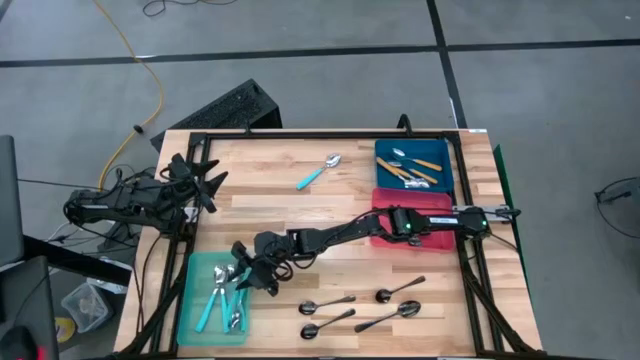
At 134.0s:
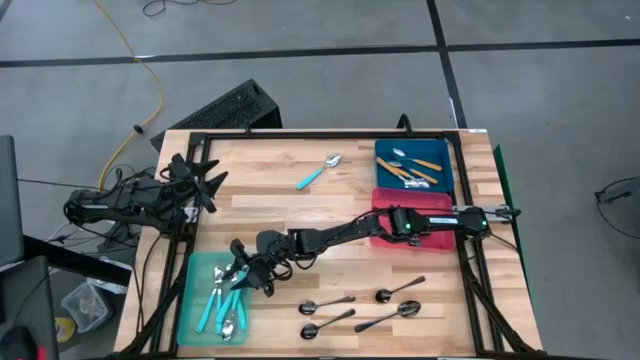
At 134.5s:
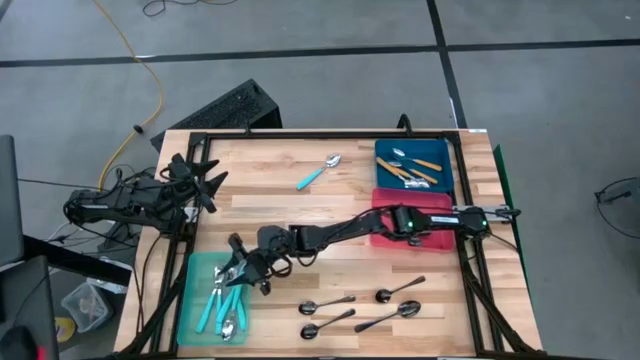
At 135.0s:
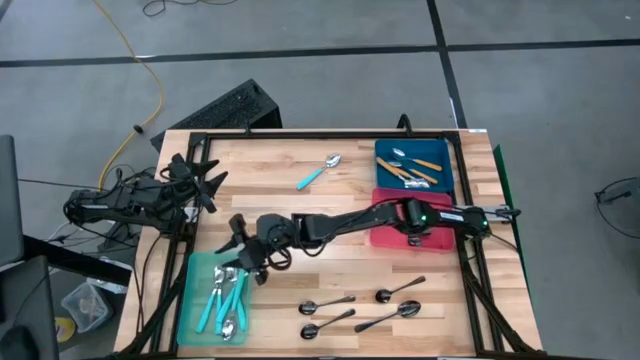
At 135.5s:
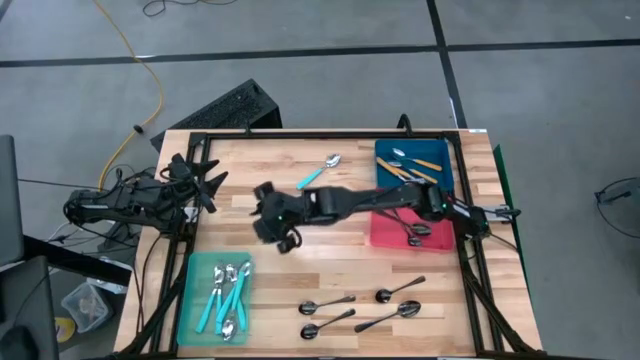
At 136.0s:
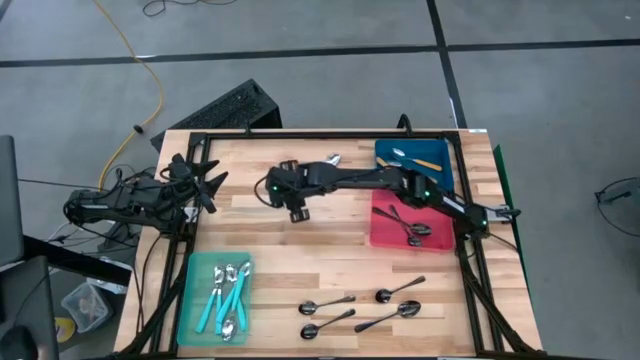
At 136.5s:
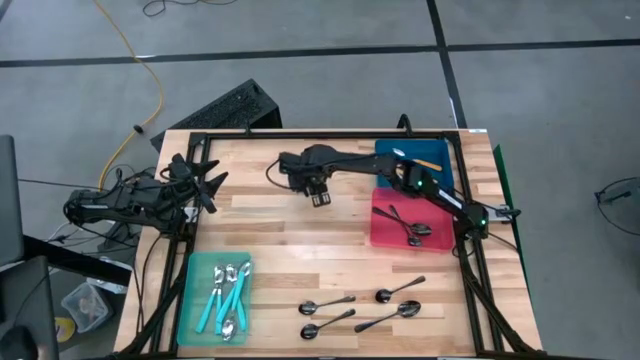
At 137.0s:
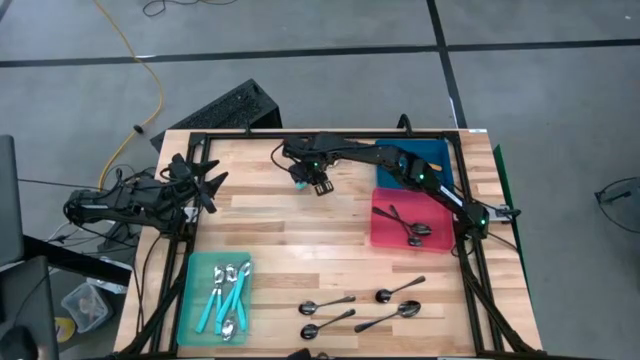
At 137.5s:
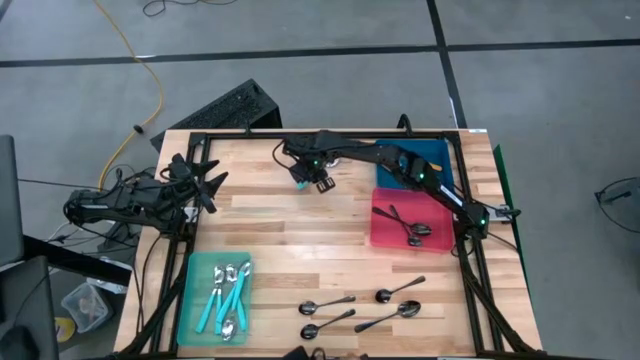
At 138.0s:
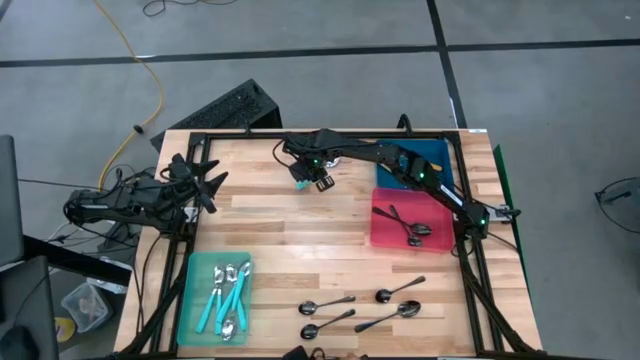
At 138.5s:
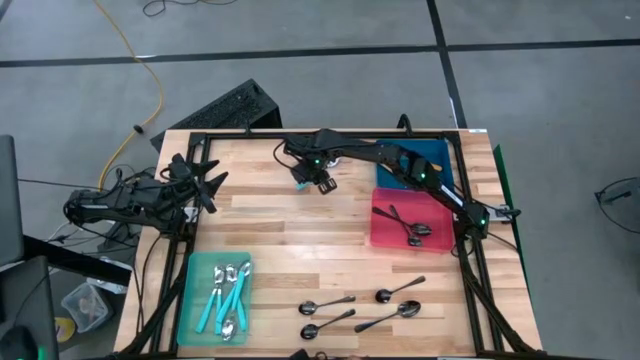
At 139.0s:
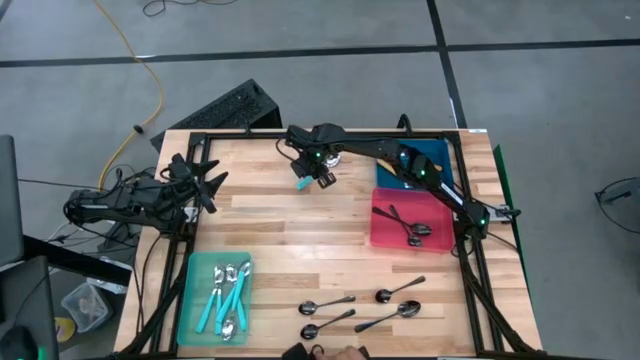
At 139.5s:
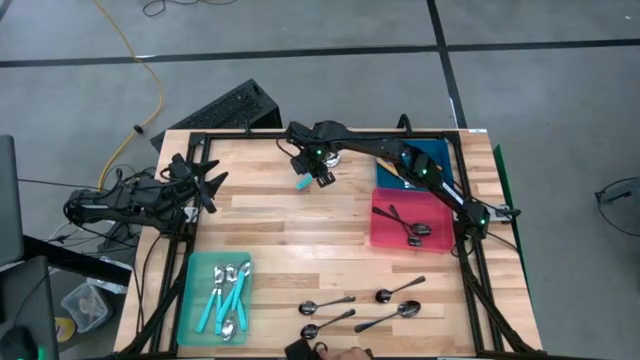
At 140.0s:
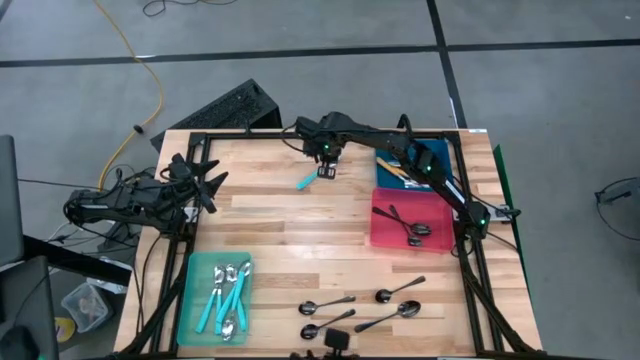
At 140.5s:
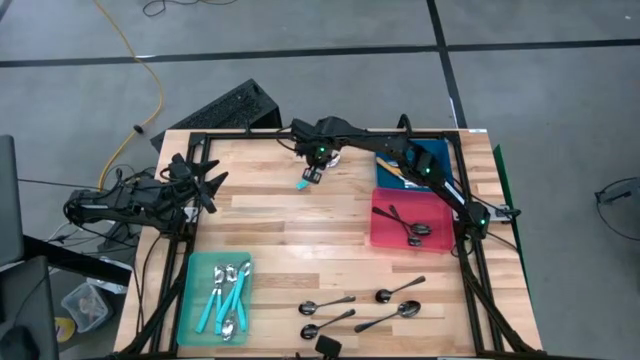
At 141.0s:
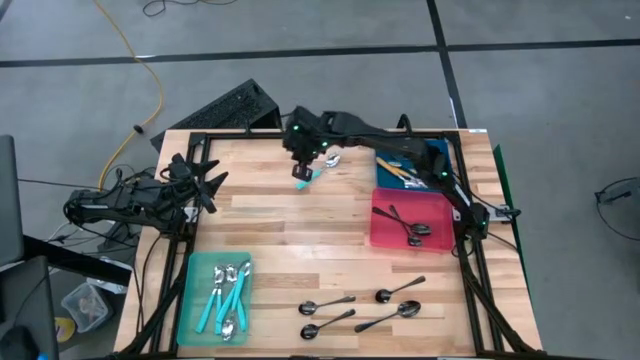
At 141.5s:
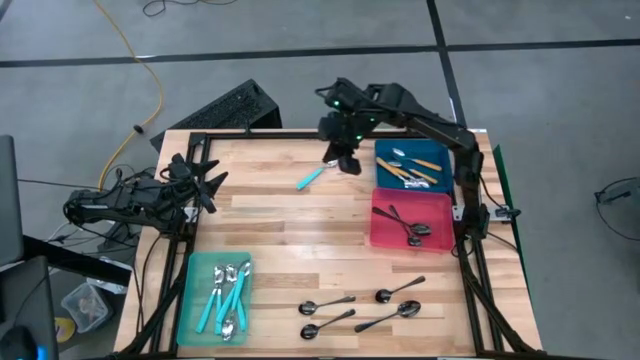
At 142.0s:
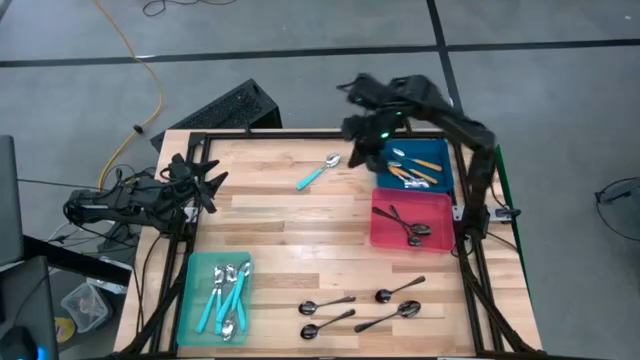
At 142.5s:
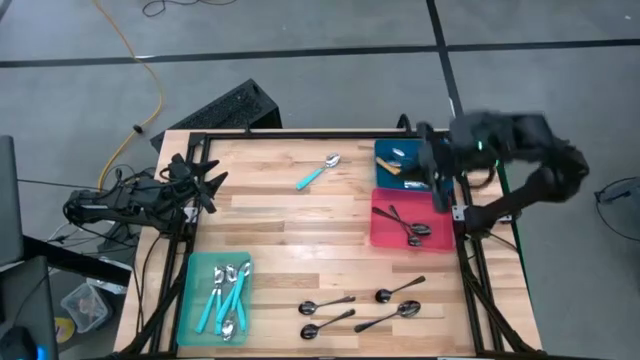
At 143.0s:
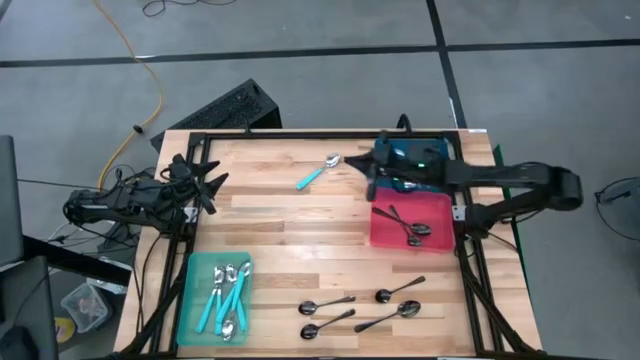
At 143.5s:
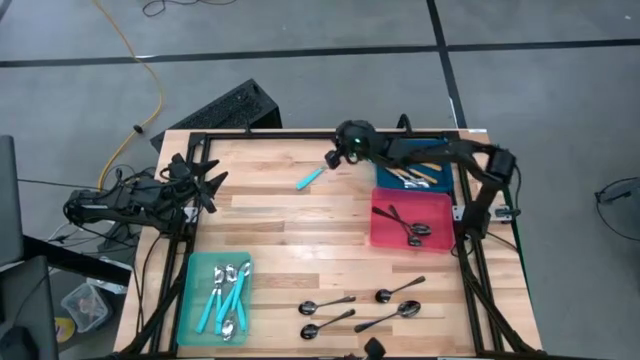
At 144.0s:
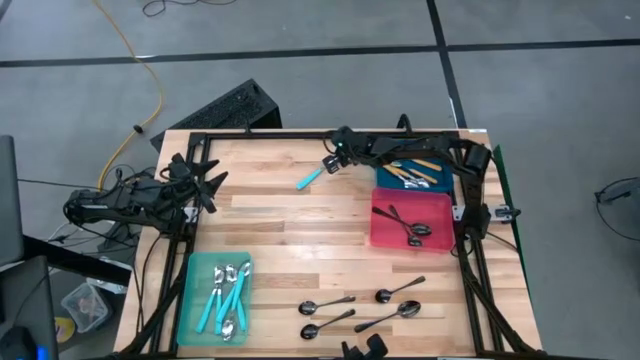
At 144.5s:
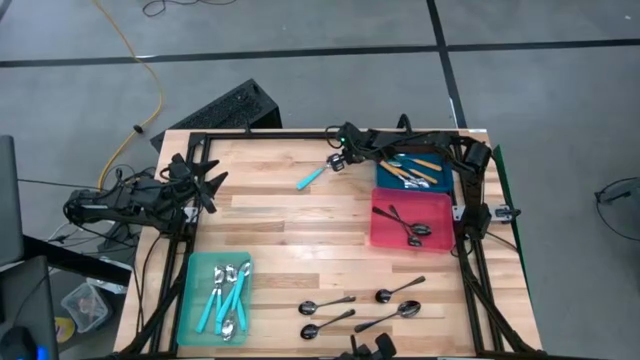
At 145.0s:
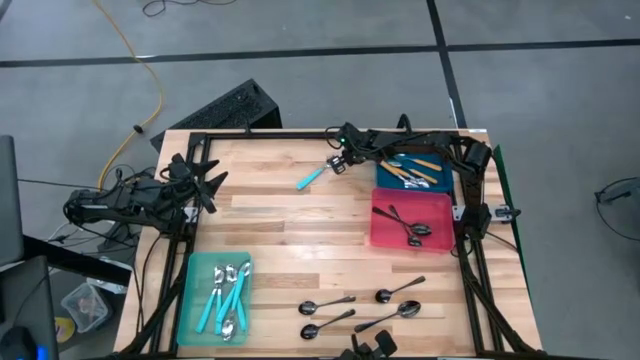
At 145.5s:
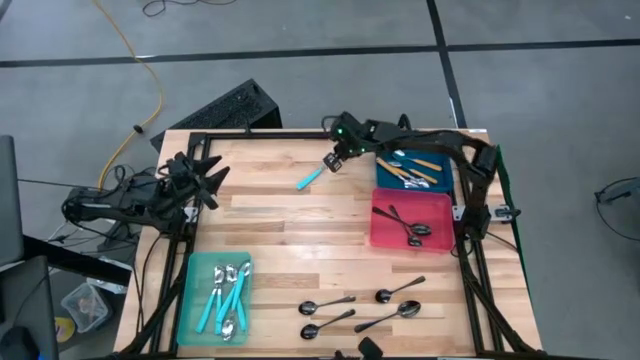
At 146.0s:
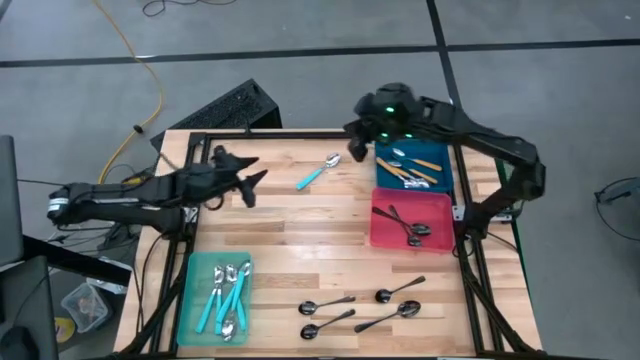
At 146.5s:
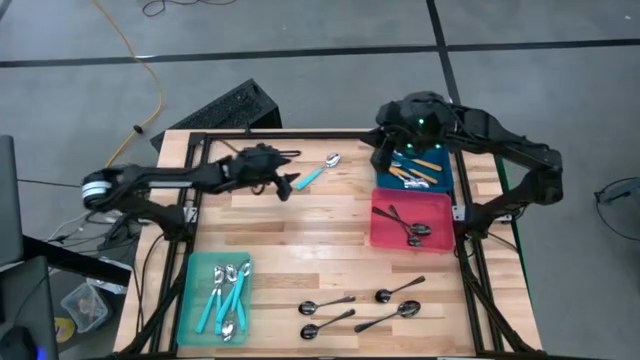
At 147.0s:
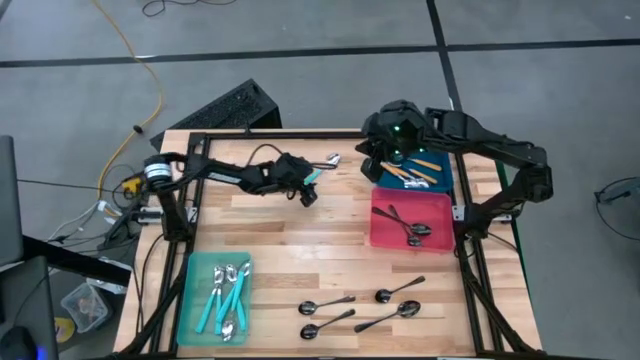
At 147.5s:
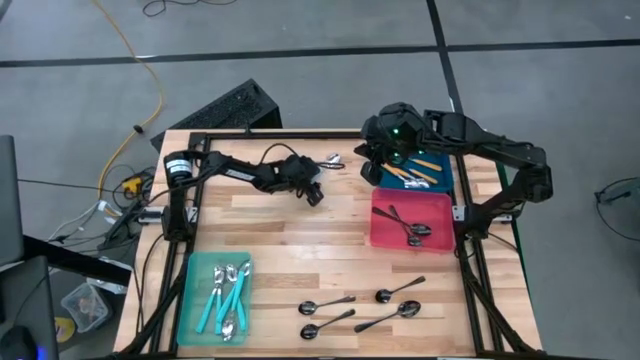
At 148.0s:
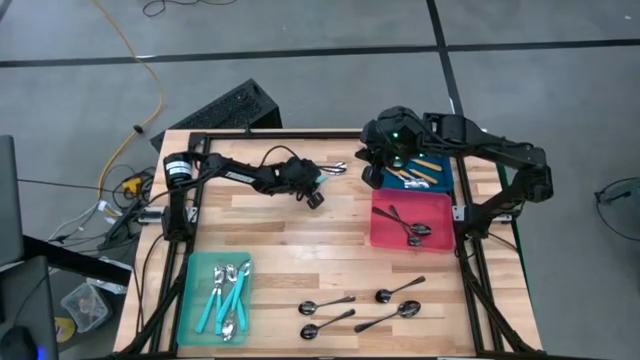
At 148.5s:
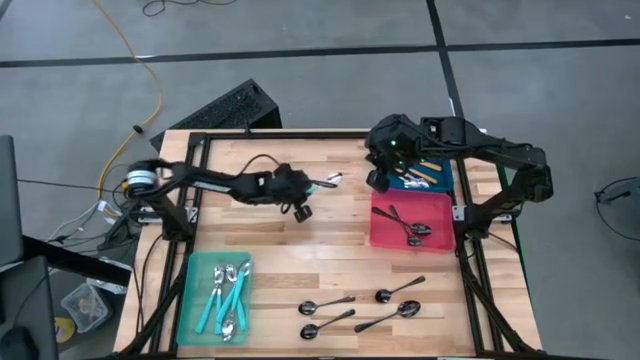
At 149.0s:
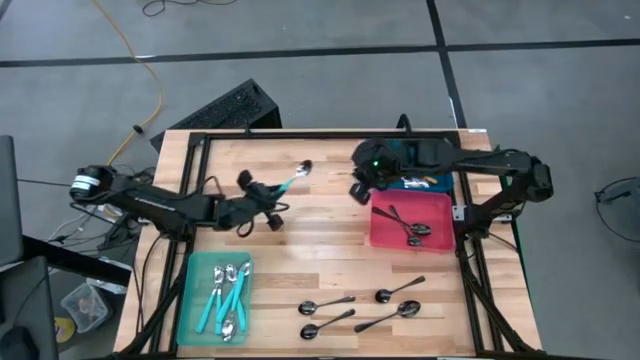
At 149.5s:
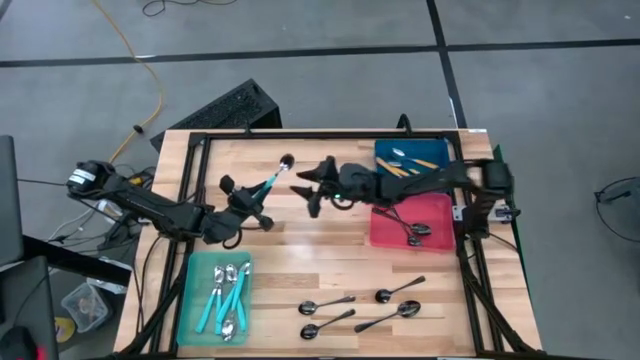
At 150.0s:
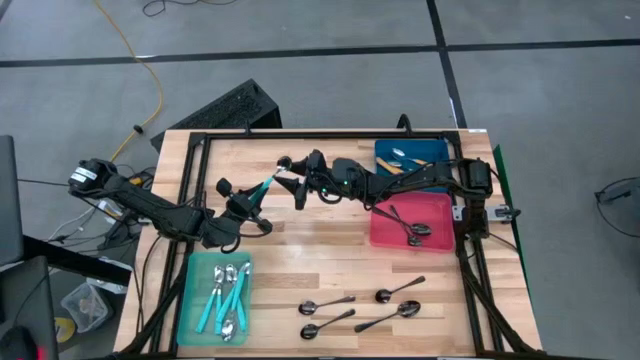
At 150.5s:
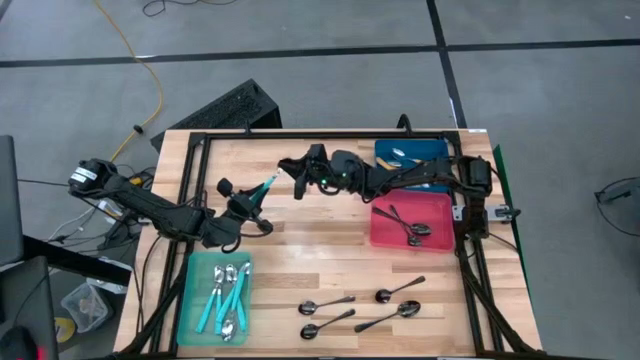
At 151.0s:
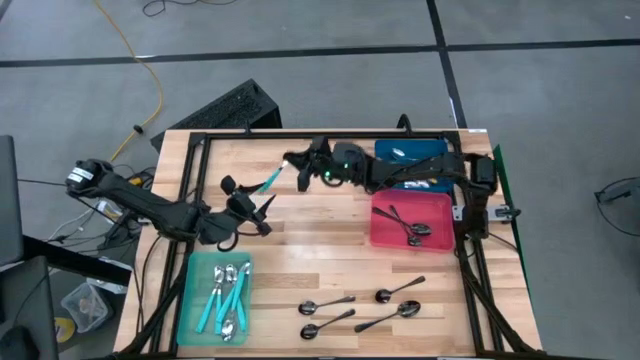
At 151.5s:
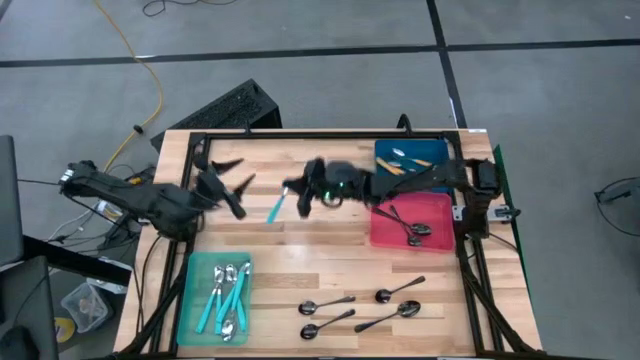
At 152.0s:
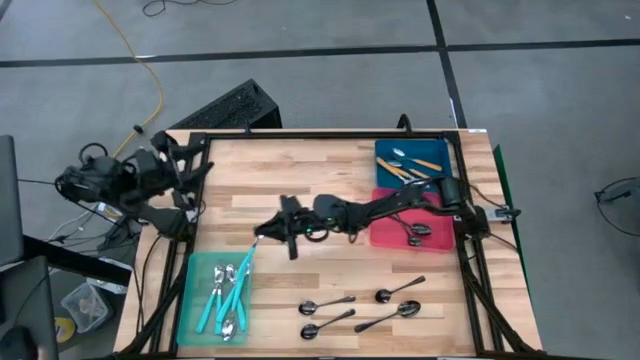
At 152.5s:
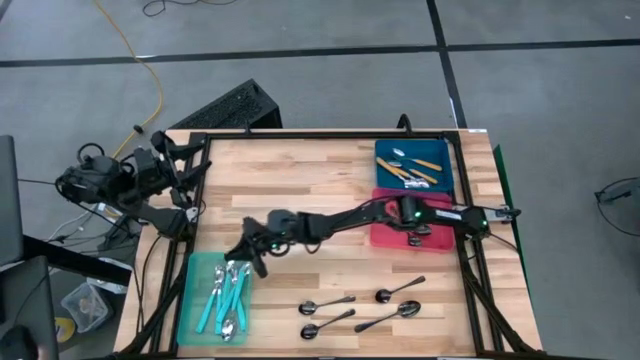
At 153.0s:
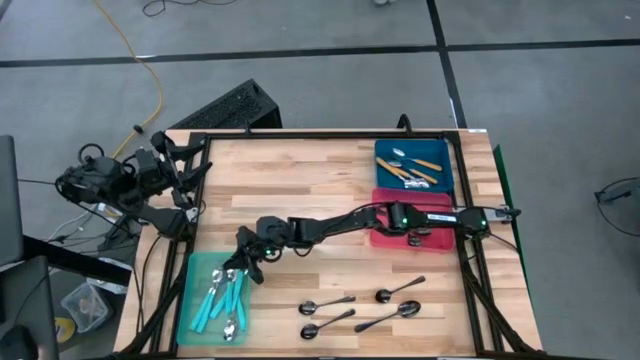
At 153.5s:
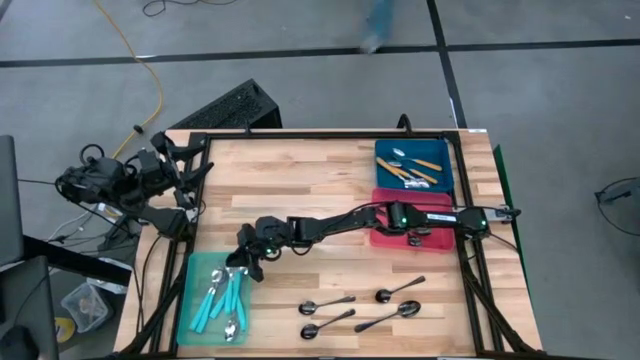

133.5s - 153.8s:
Task: Sort silverware by color (type)
Put the blue spoon into the skyblue bin

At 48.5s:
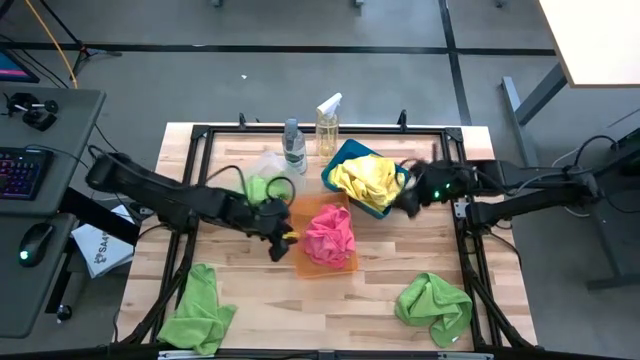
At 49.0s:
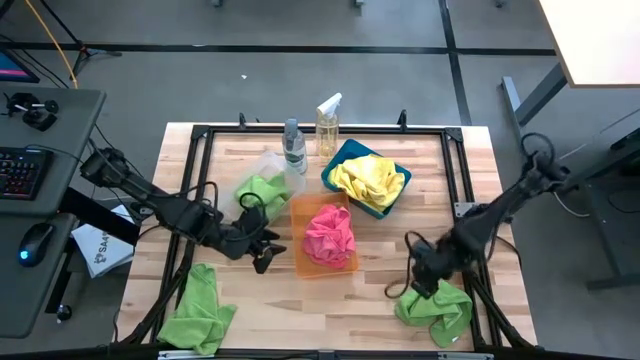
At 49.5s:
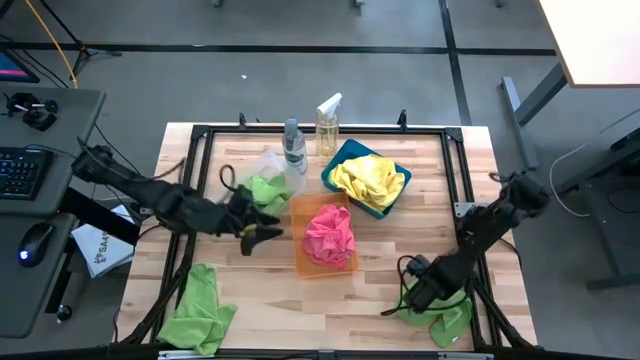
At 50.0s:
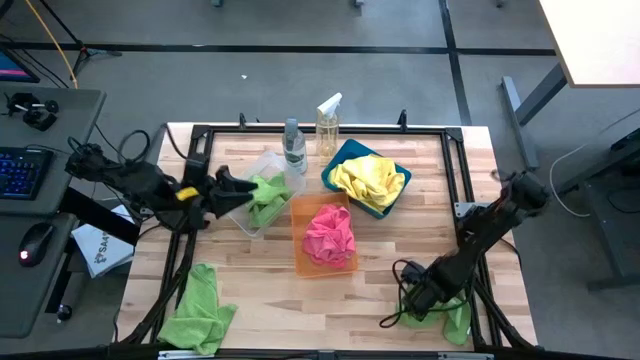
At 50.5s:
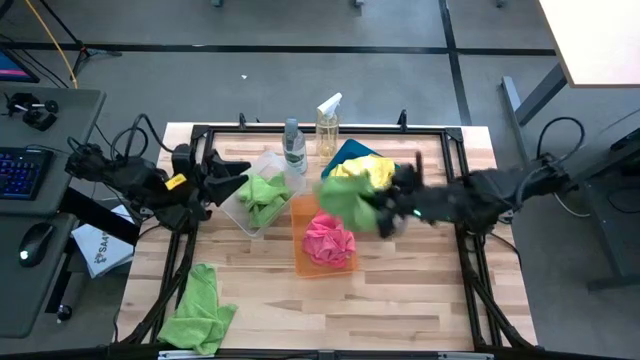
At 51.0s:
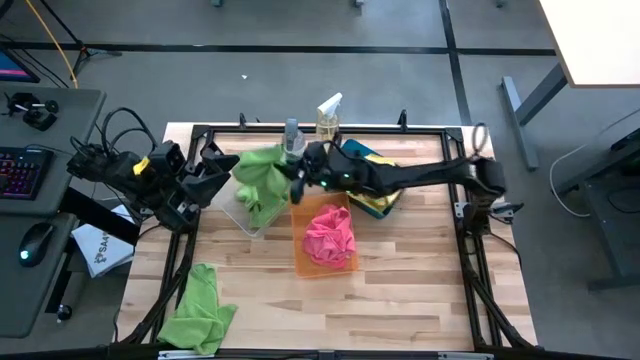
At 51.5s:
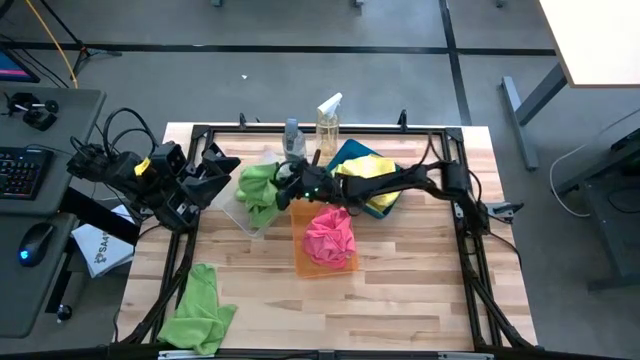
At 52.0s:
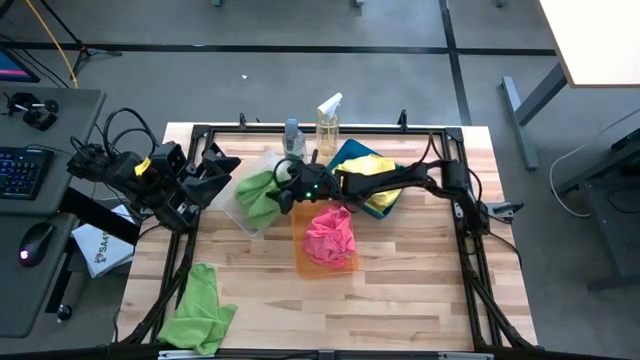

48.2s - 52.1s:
Task: Sort microfiber towel by color & place in baskets
Put the right green towel into the transparent bin
